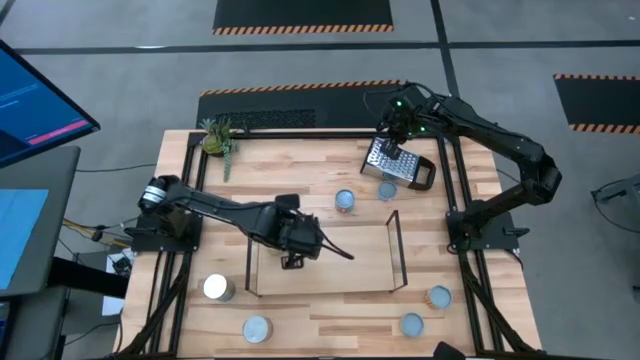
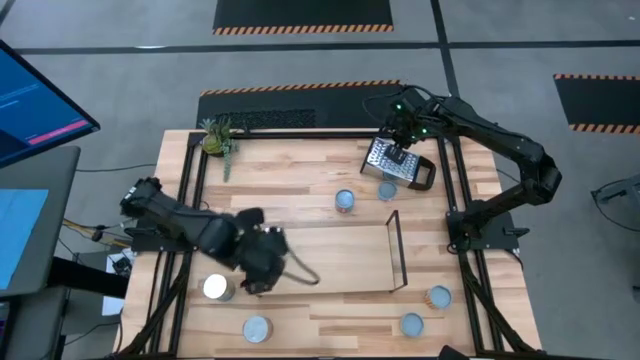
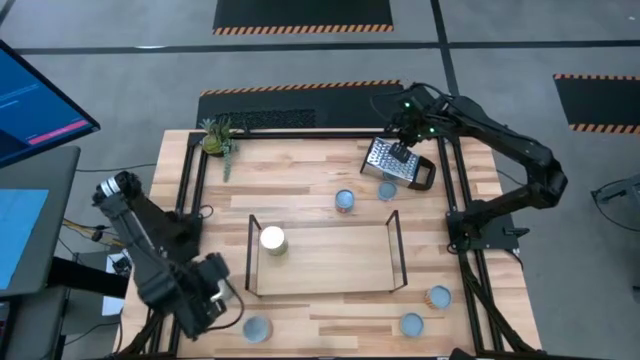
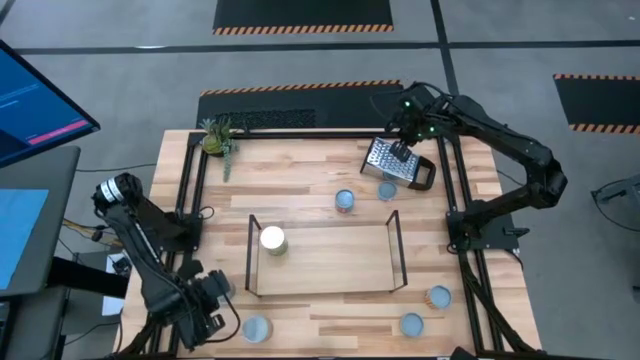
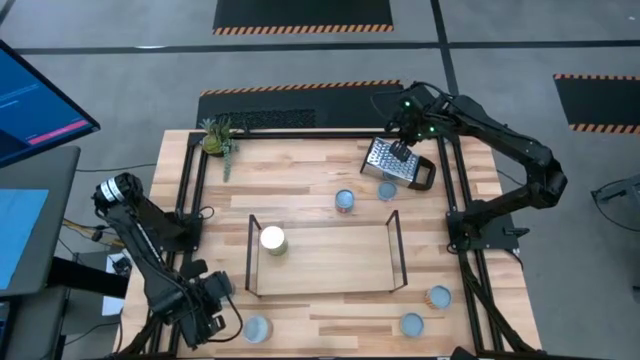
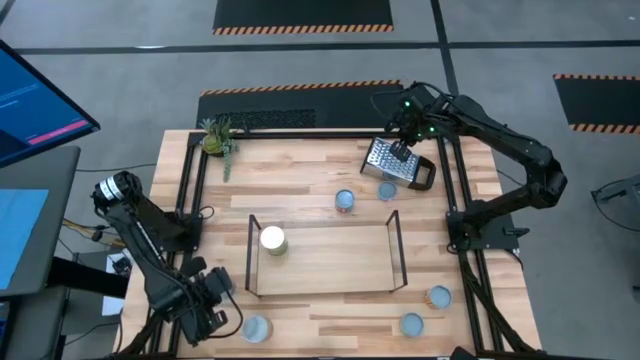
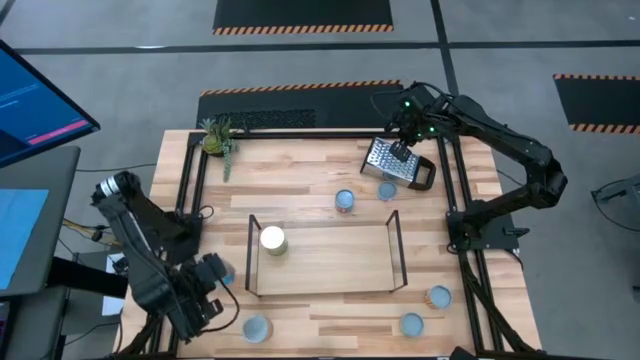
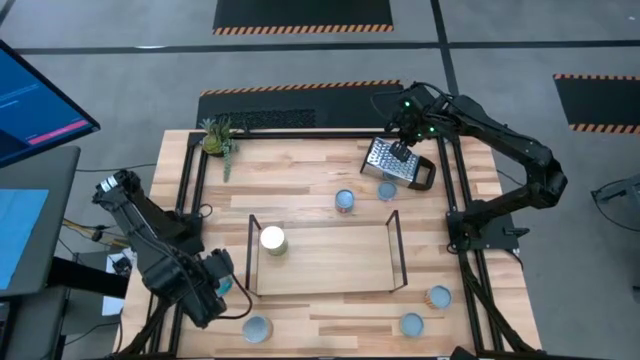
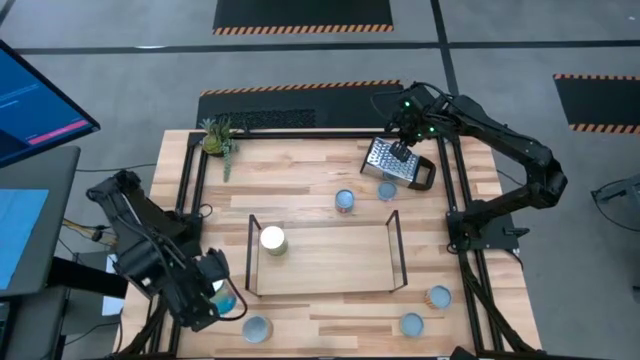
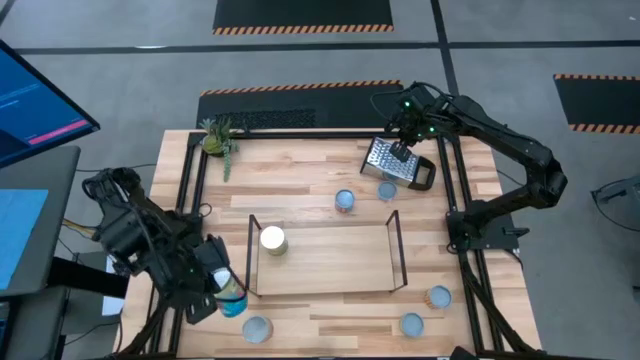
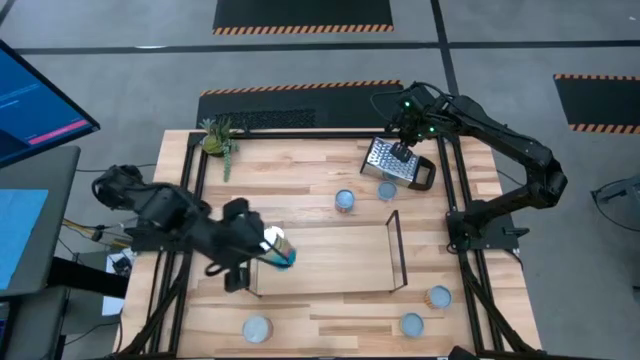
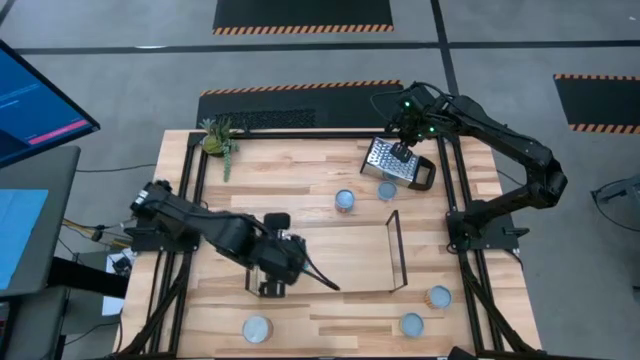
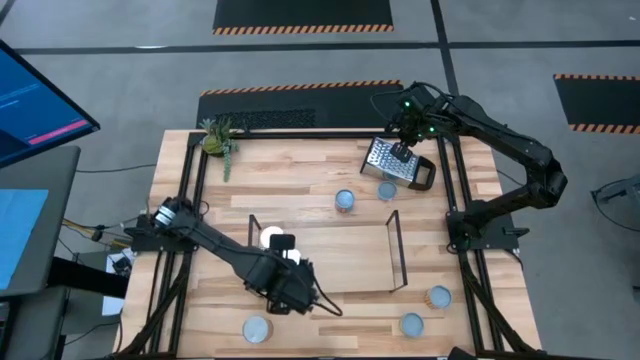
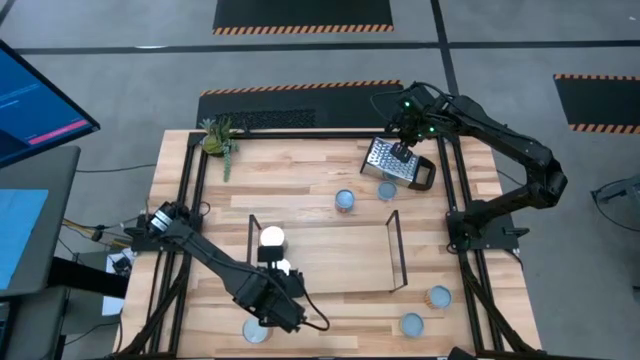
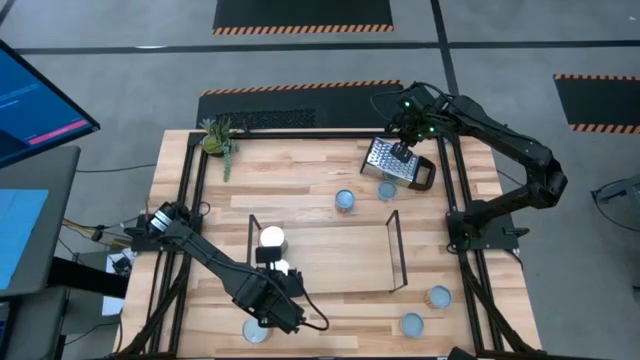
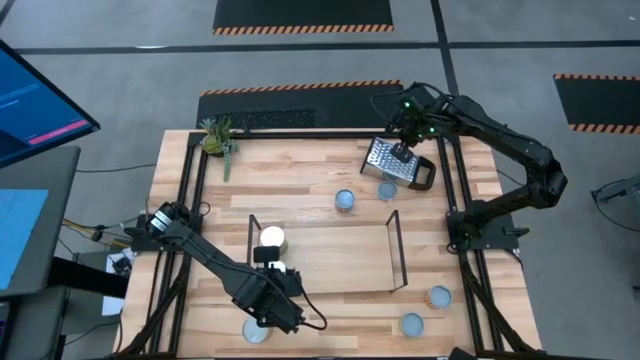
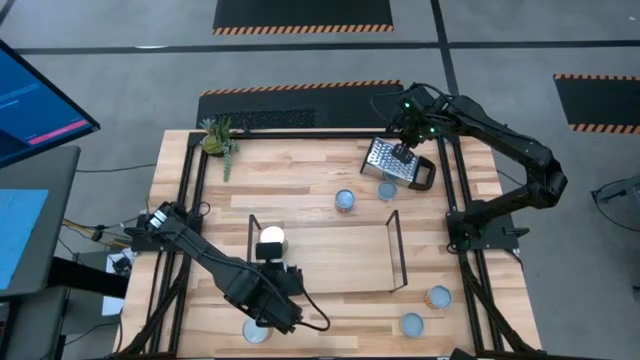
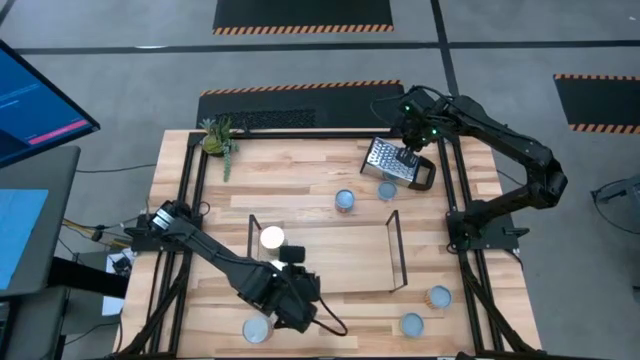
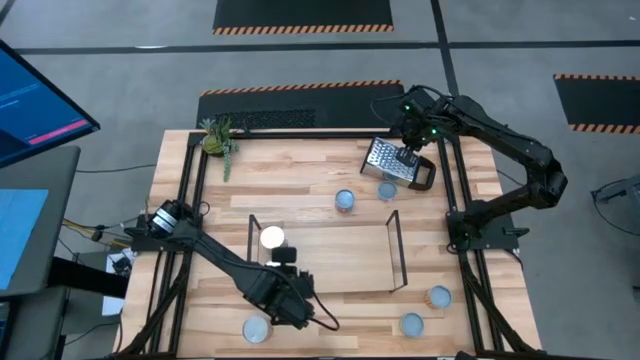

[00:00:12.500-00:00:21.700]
Task: Pick and place cans onto a shelf
Put the canned tomatoes on the shelf

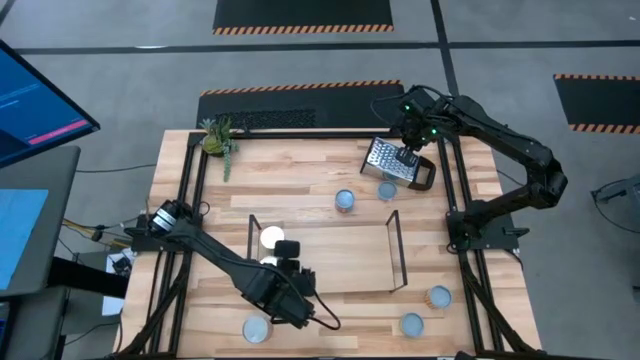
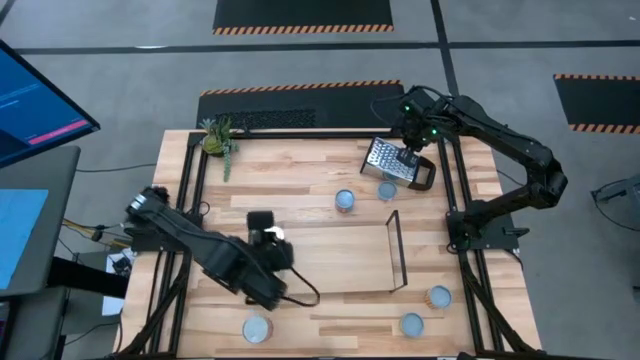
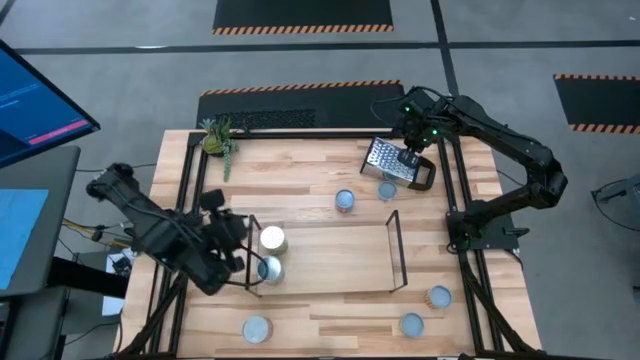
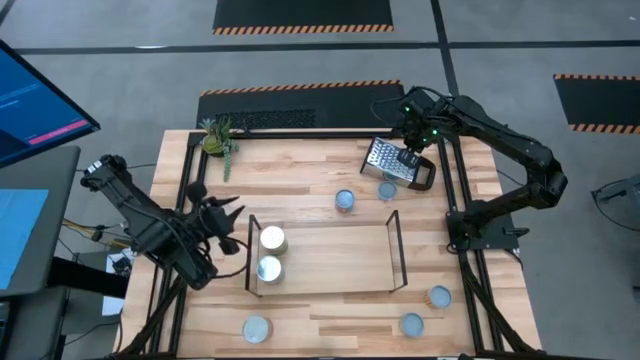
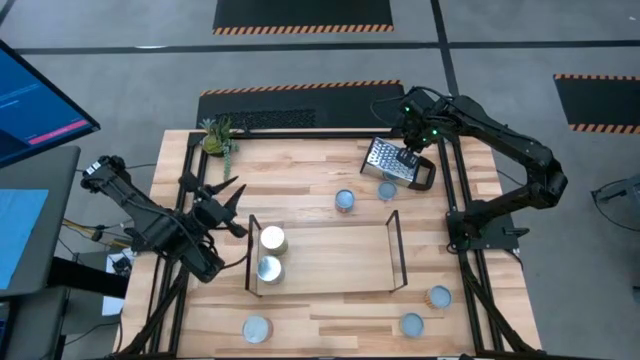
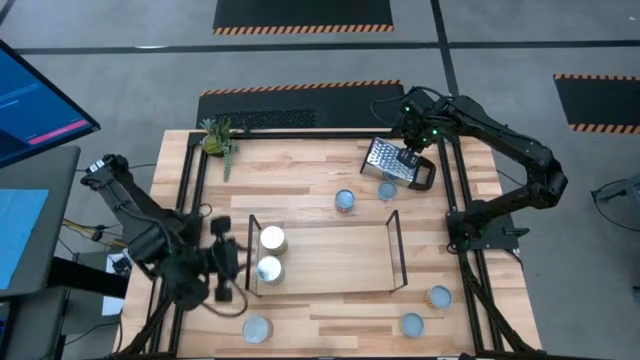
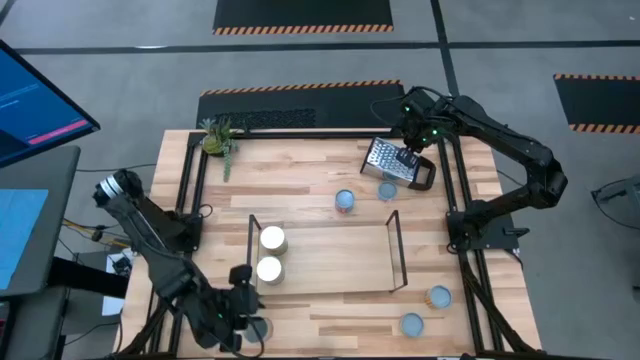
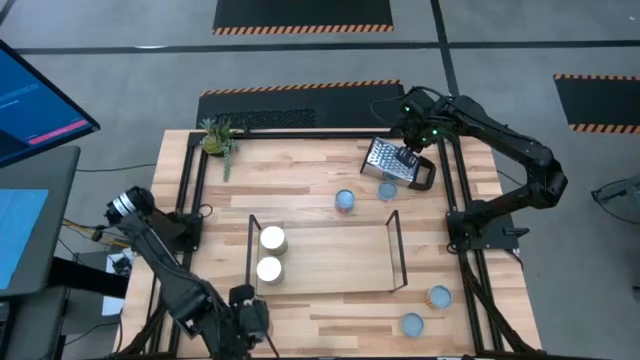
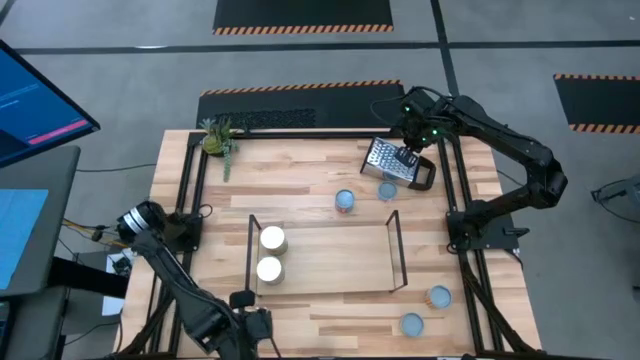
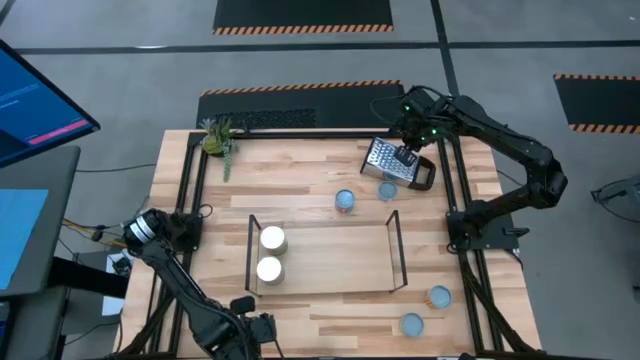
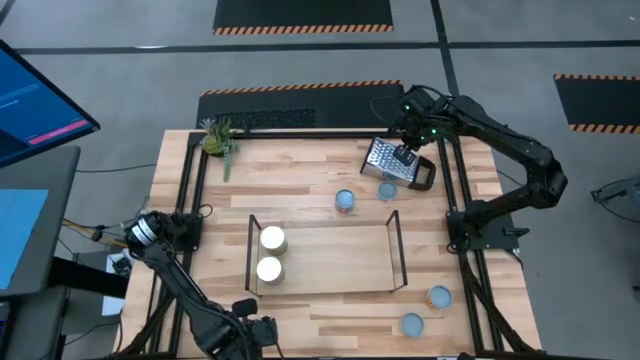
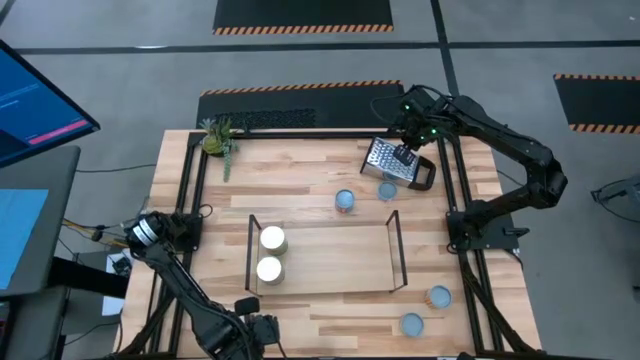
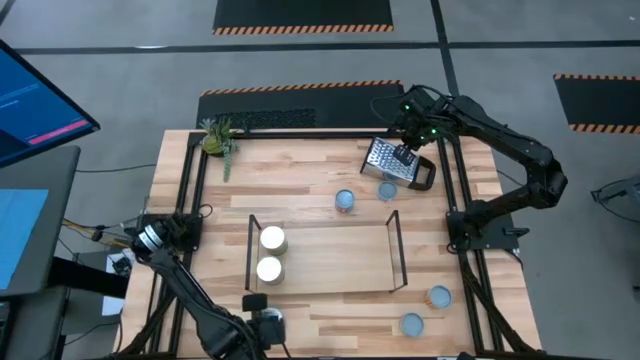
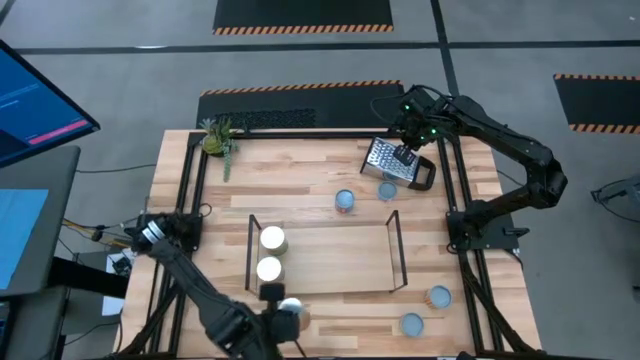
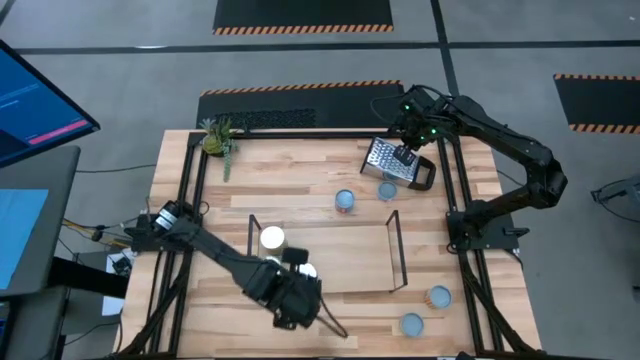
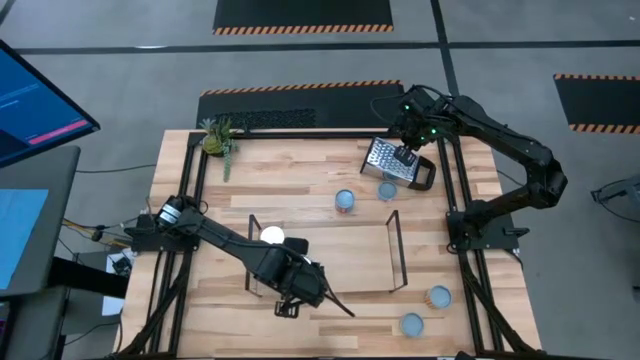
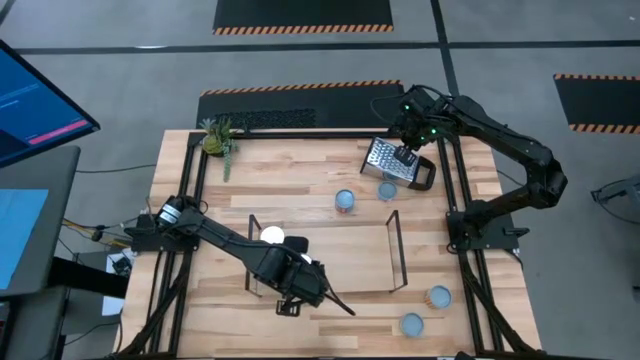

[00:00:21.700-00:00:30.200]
Put the canned green beans on the shelf

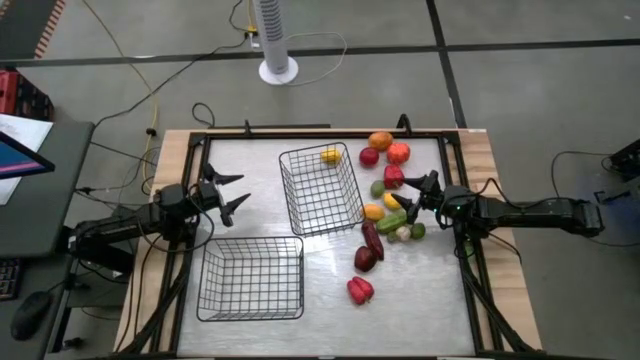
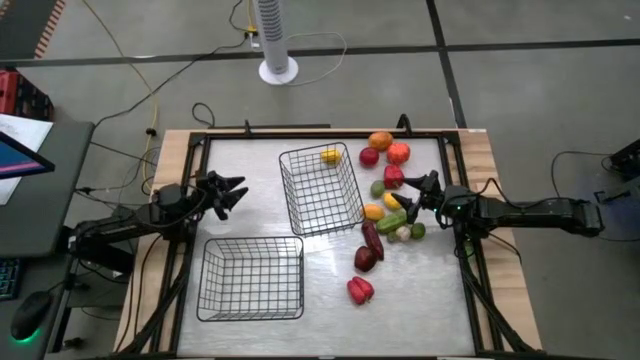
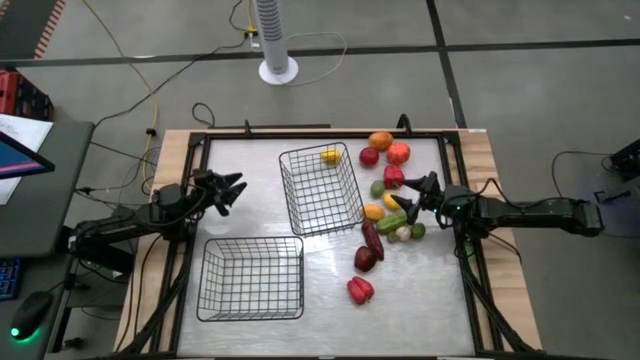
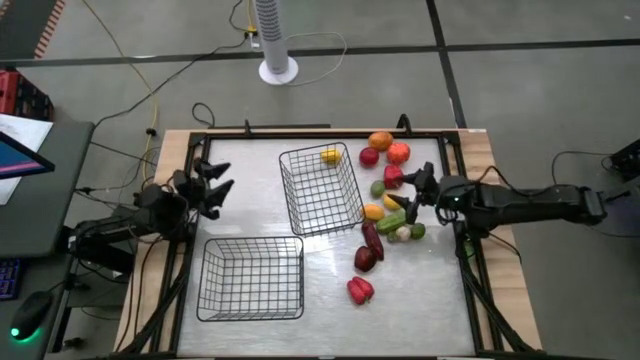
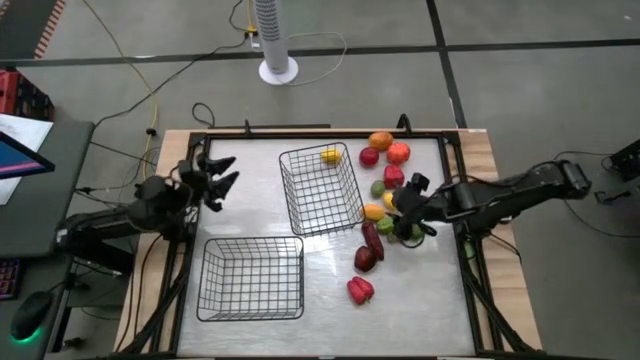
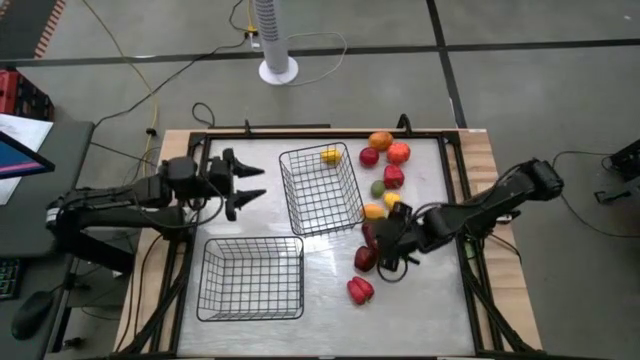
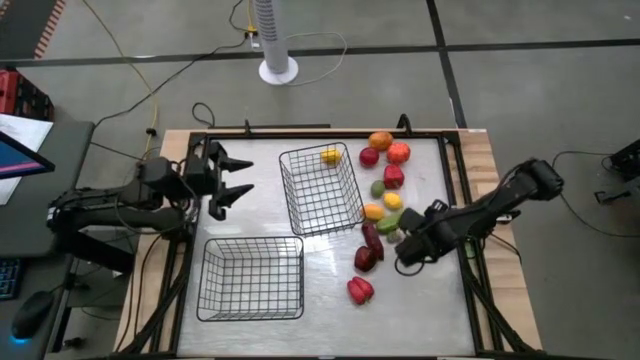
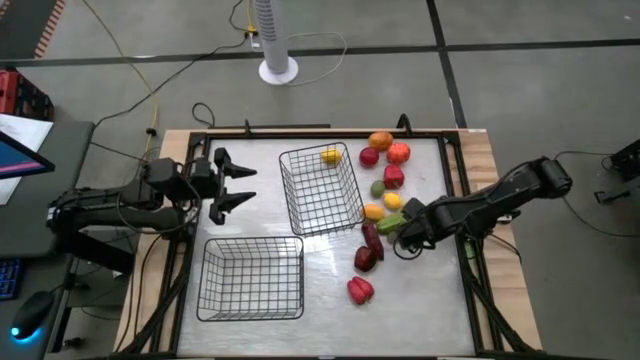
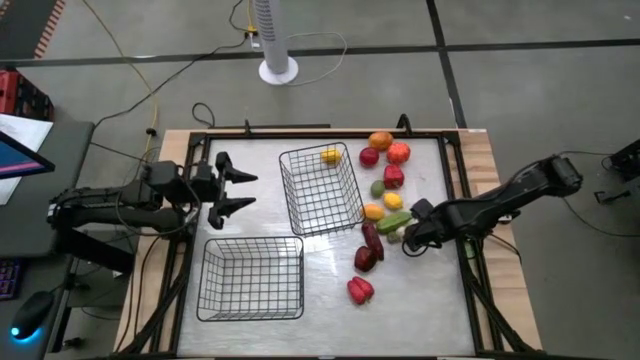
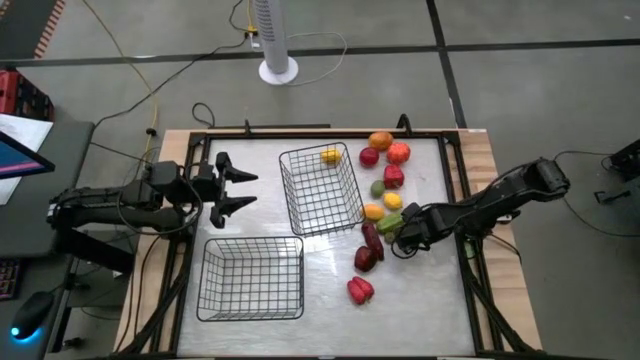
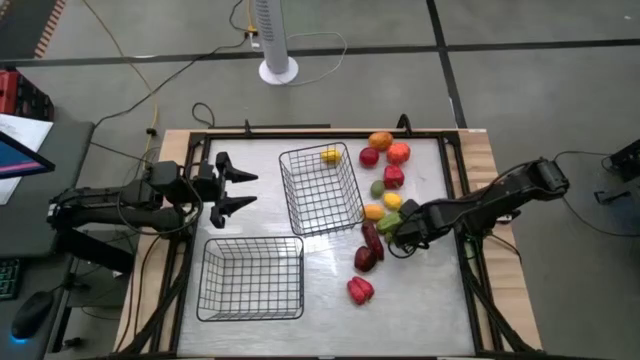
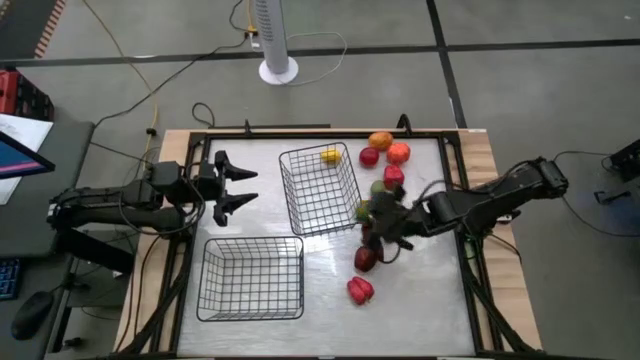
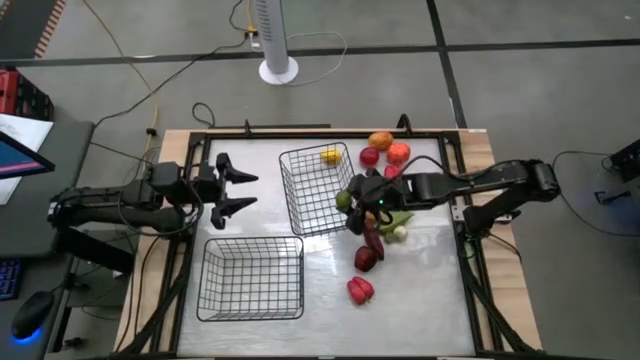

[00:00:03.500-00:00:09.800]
Task: Sort produce into baskets
Put the bottom green lime into the top black wire basket
